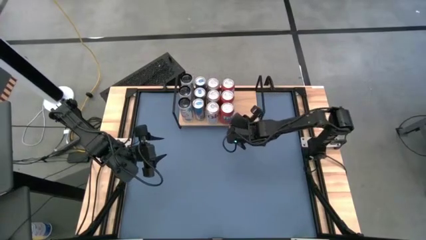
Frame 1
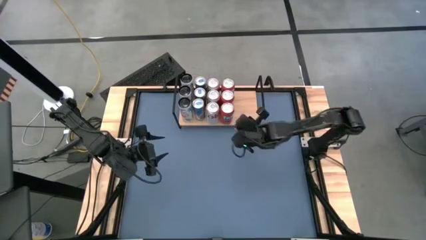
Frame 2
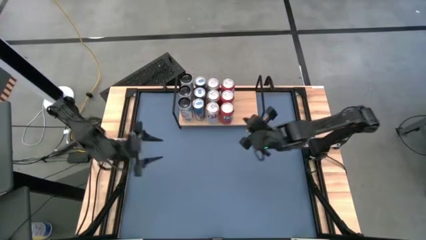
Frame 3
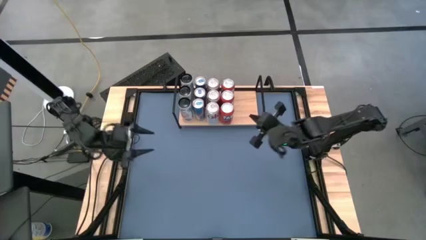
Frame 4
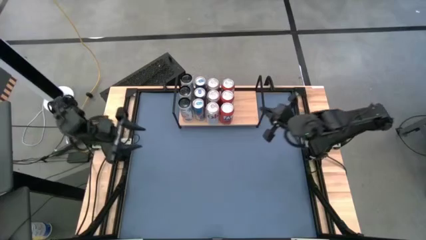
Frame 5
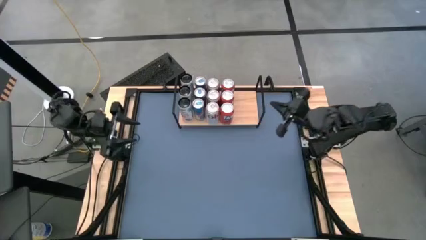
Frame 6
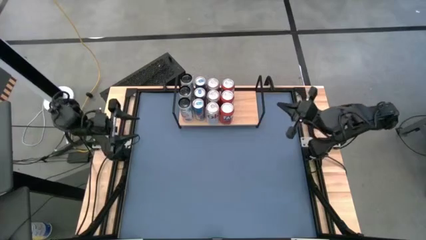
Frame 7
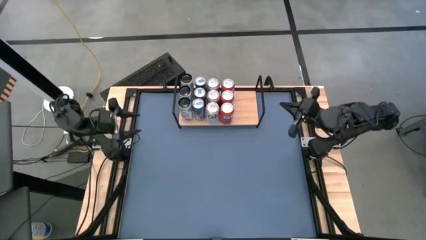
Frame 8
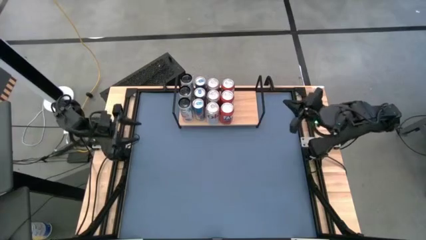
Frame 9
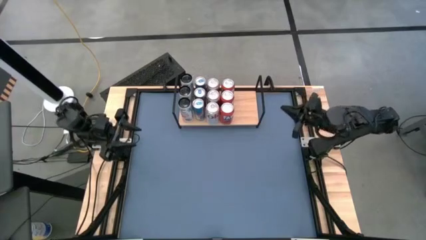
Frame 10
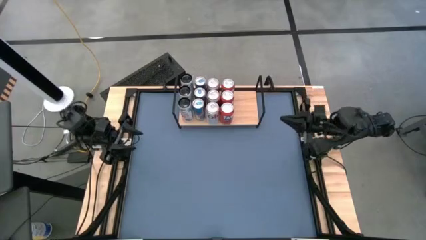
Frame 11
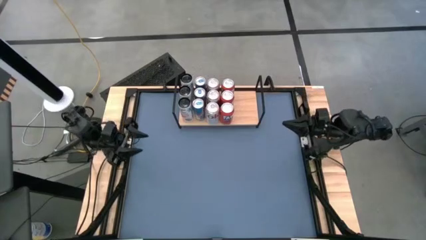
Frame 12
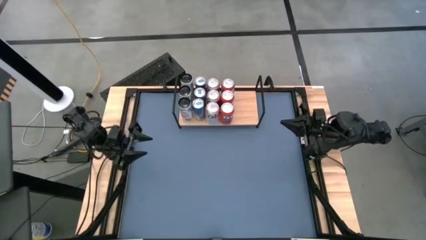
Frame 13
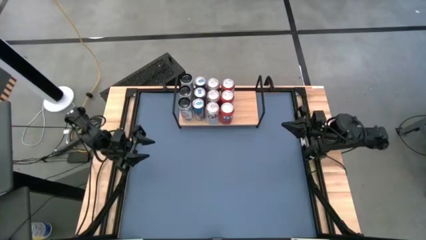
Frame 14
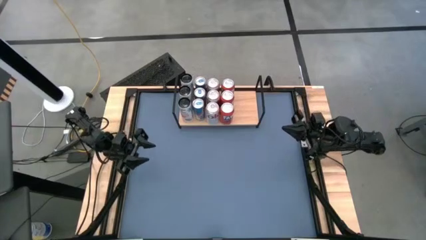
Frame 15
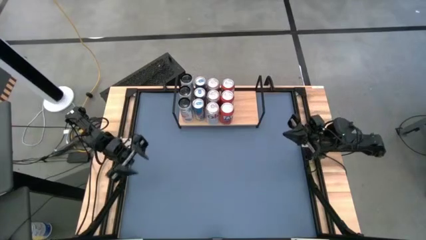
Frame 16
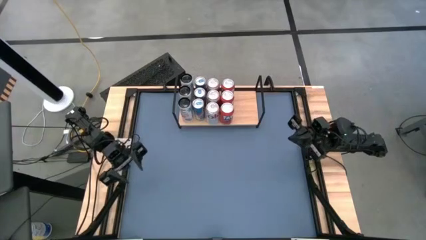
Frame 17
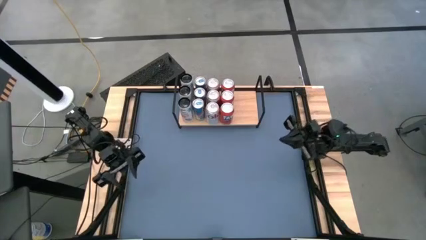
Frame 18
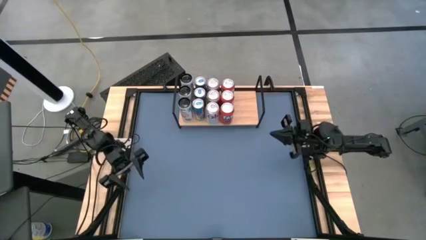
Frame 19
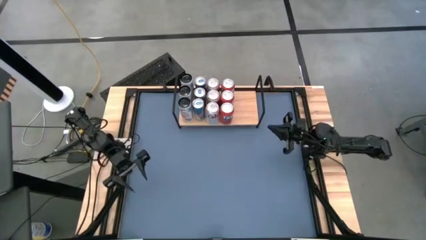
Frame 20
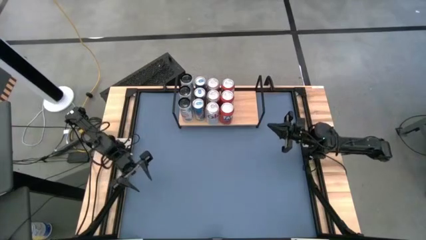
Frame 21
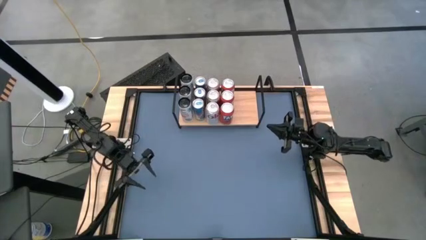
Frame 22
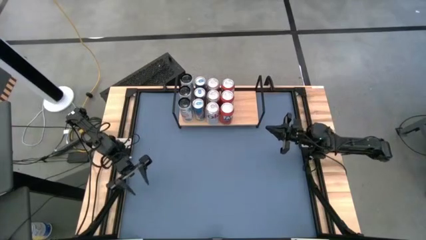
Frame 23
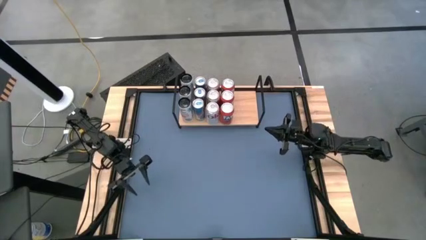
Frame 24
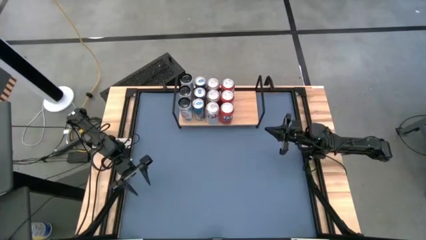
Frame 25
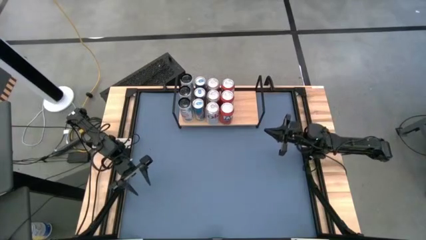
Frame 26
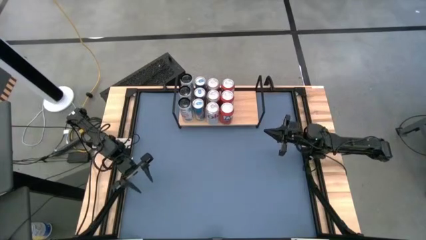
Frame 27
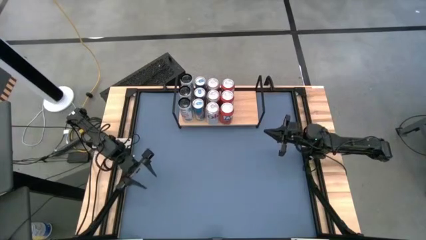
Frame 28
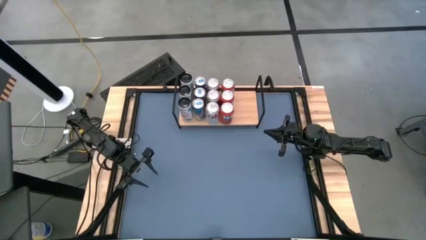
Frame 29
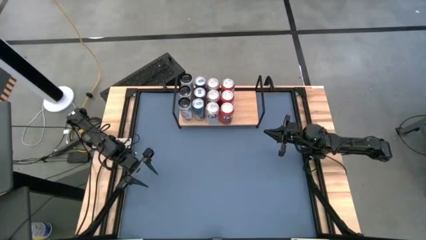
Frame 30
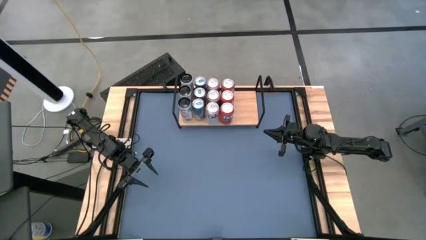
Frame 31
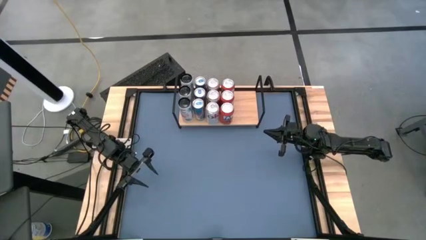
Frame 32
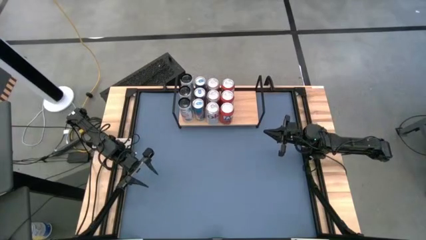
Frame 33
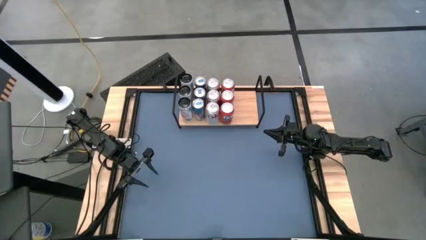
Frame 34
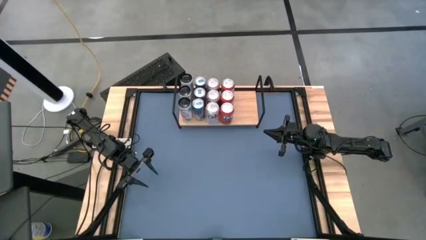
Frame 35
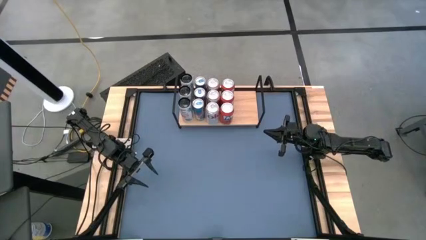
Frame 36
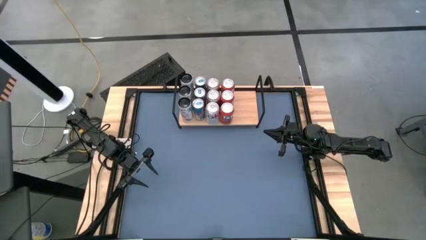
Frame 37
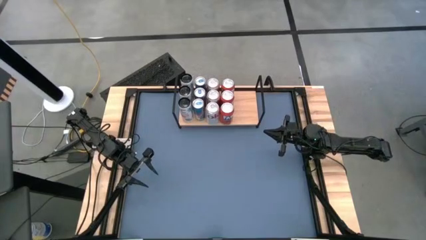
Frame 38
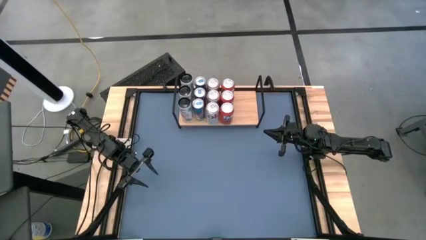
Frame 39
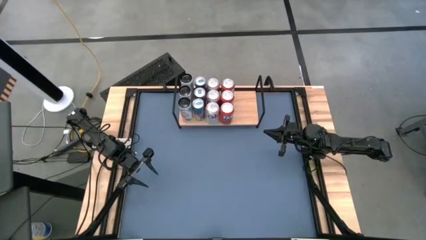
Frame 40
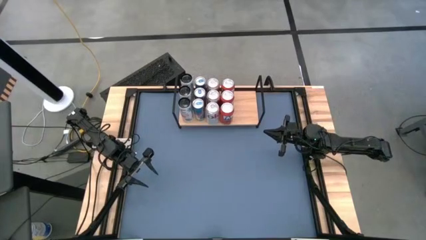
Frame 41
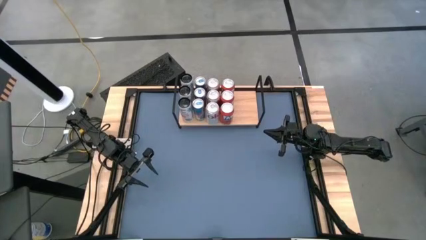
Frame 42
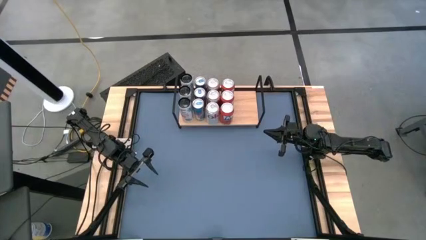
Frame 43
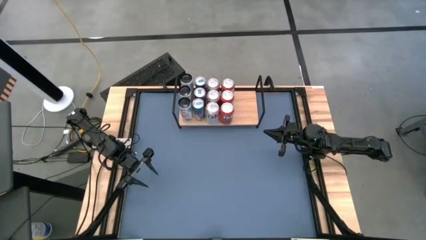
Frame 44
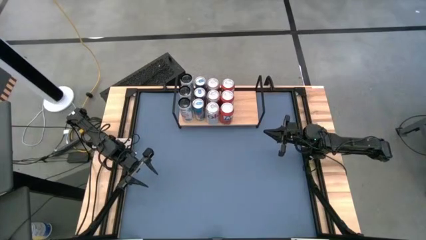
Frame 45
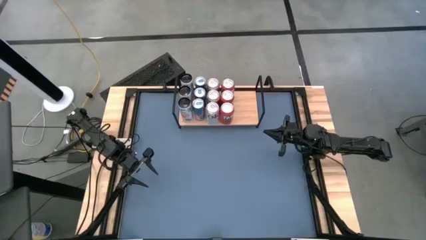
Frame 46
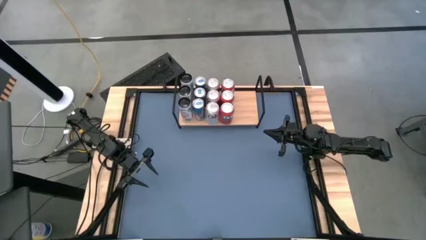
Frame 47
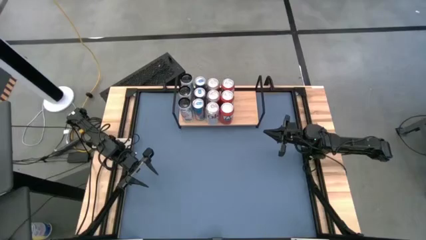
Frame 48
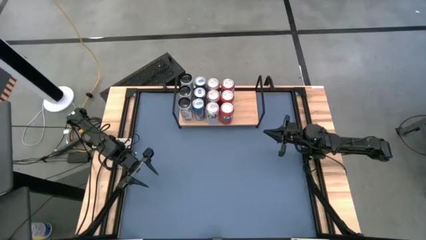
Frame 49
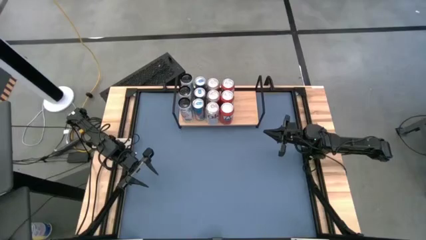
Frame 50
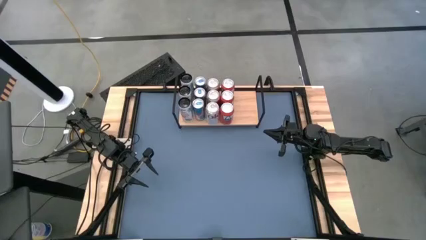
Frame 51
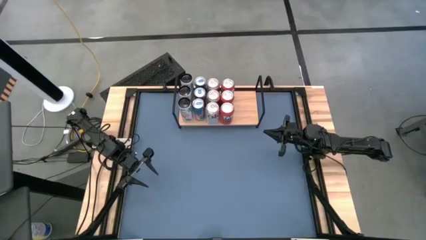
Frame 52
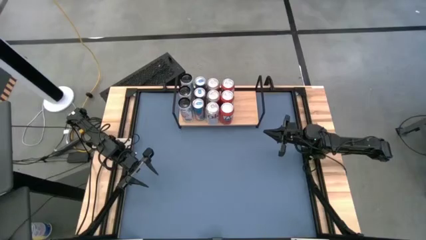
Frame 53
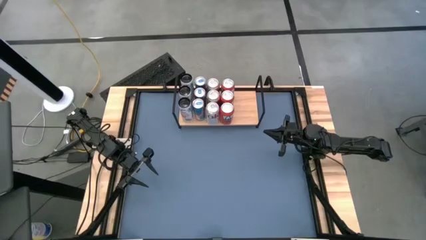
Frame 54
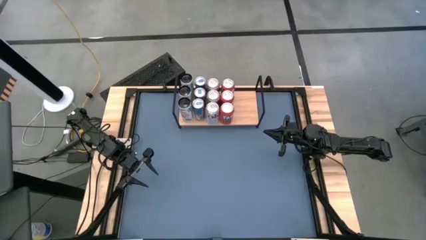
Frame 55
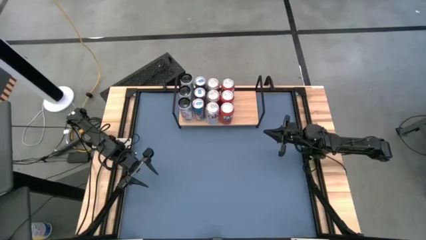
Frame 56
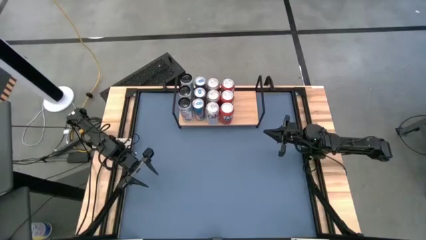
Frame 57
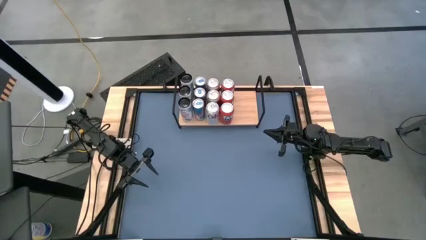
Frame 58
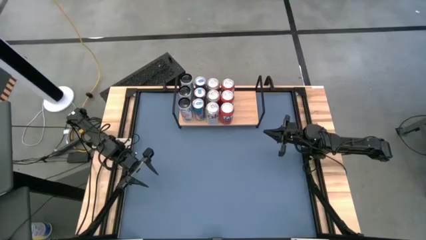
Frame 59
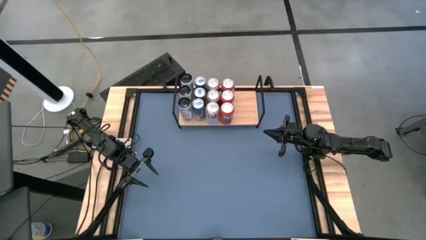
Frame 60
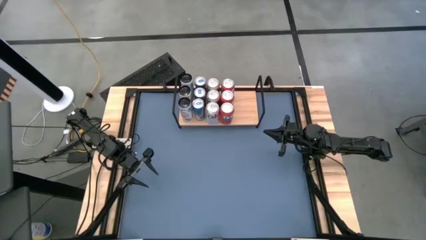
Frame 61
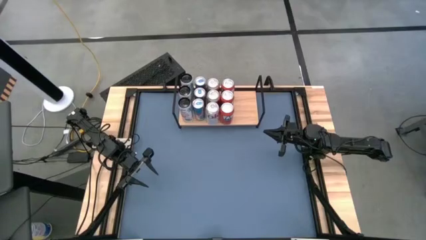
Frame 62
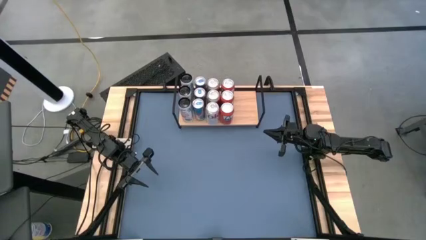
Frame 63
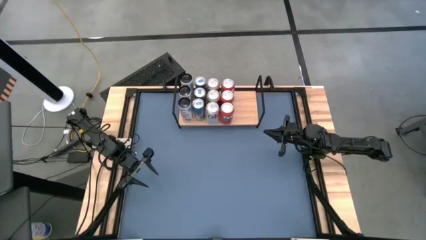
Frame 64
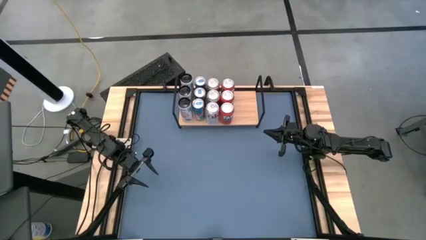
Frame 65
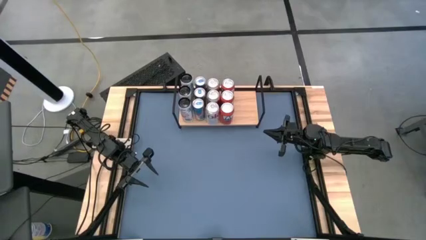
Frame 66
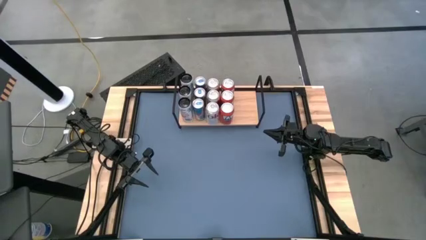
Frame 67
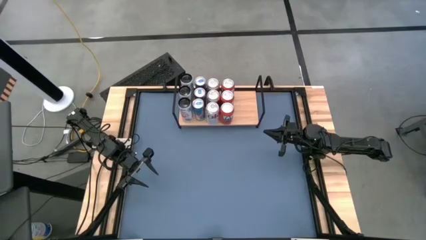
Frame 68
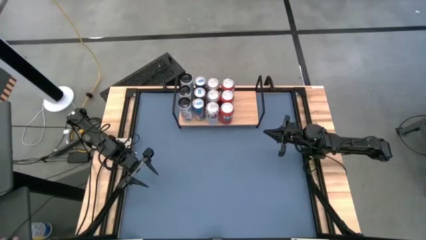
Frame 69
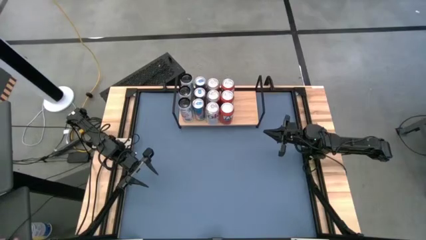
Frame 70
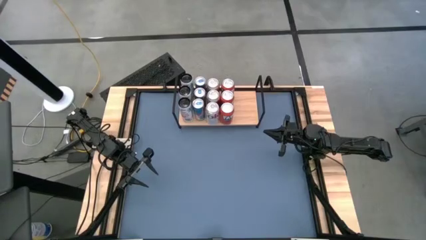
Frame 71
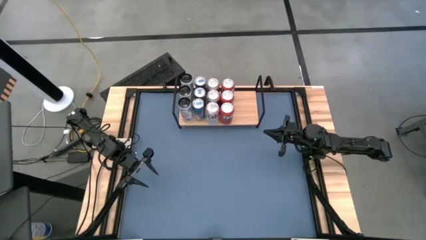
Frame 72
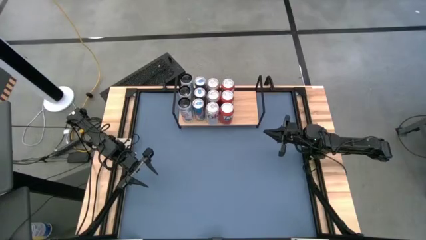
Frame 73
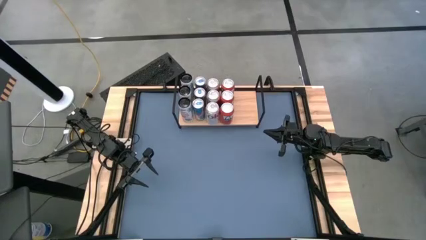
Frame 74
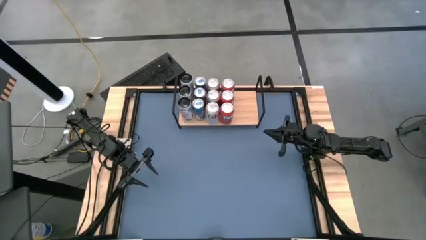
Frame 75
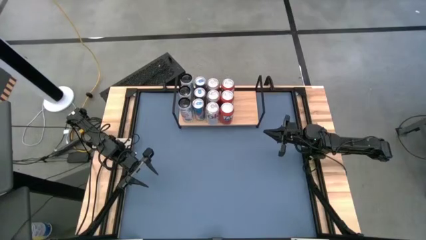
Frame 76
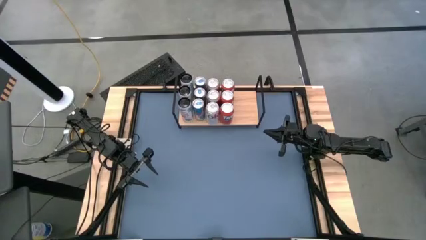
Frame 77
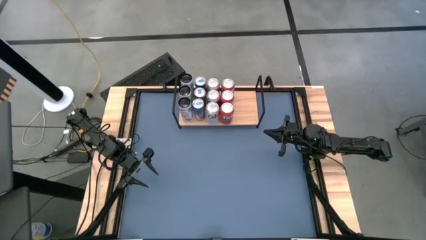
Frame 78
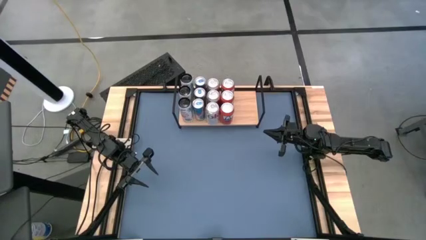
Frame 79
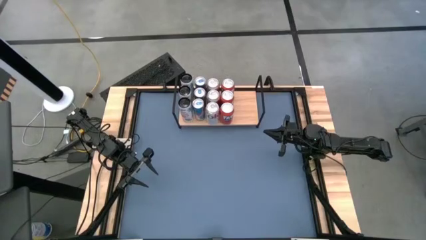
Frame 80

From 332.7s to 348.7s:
Task: Place canned beverage on shelf
Return to Home Position

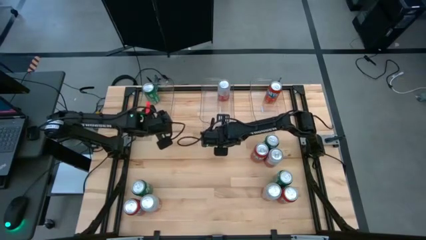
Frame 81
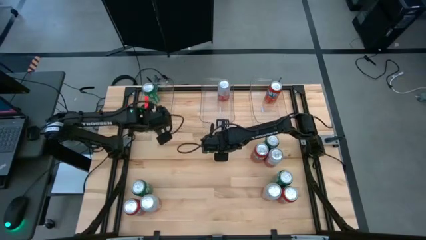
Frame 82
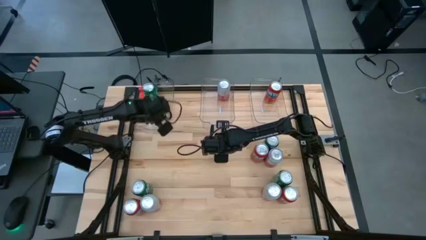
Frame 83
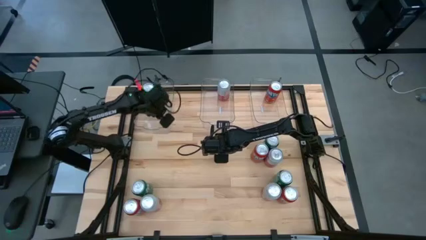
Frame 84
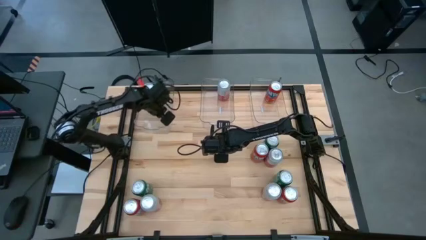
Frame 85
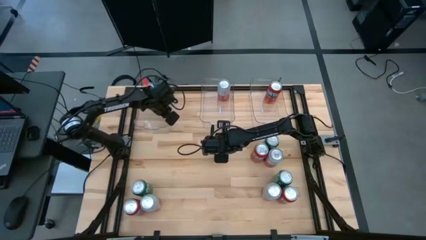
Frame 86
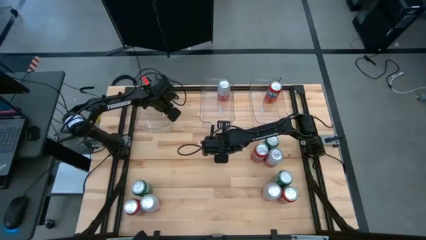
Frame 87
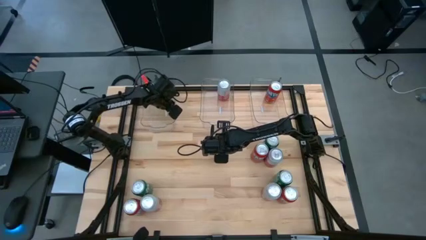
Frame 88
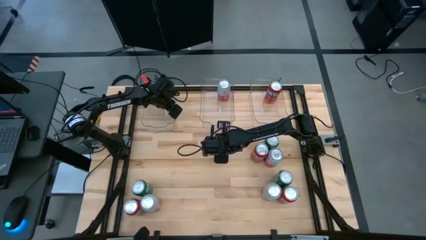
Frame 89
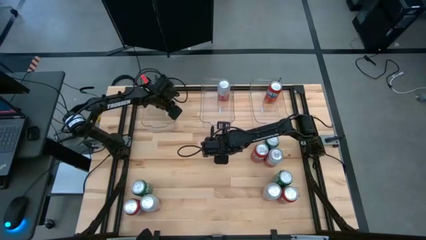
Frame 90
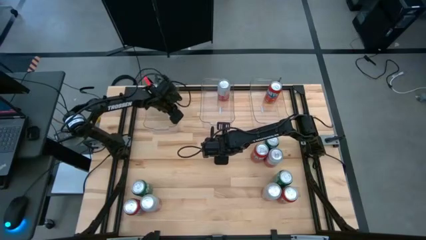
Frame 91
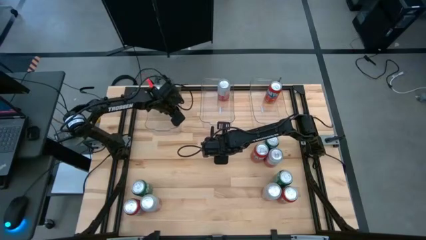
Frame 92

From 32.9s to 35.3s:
Task: Sort soda cans
Adjust the left transparent bin
